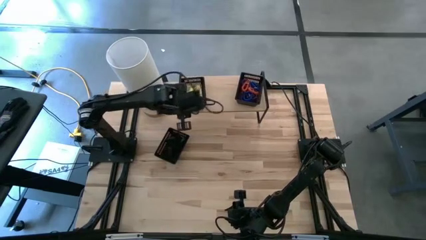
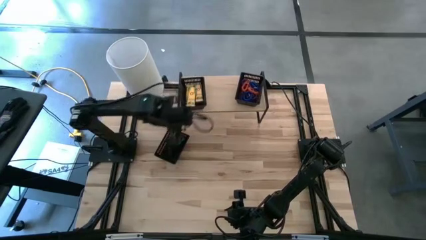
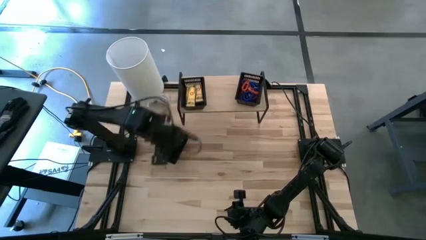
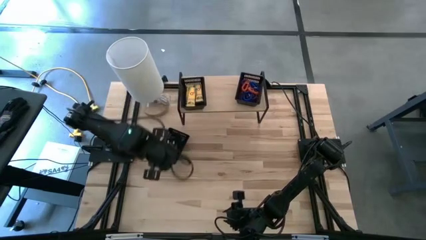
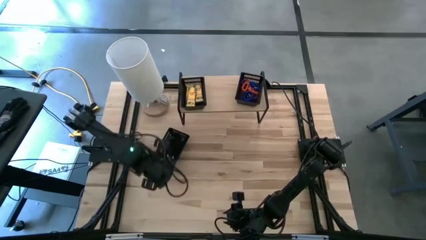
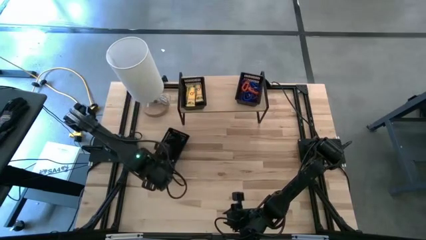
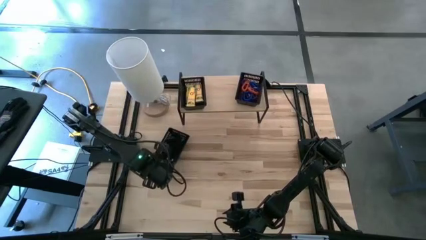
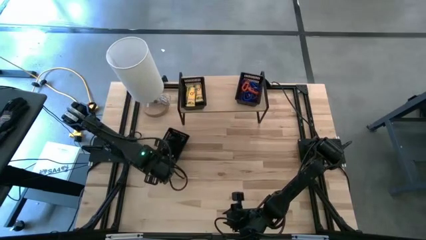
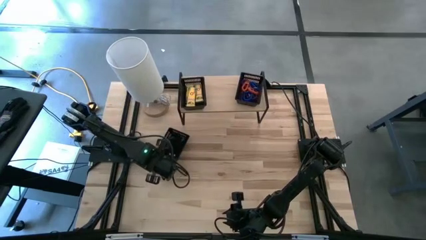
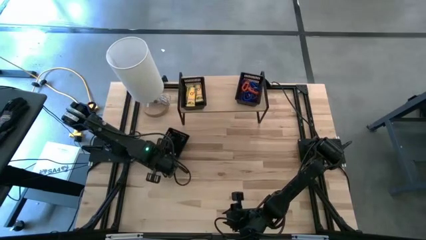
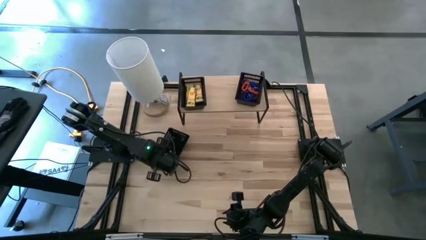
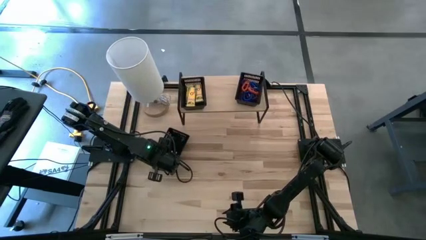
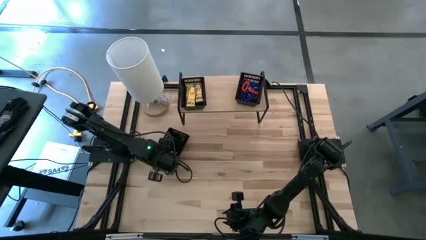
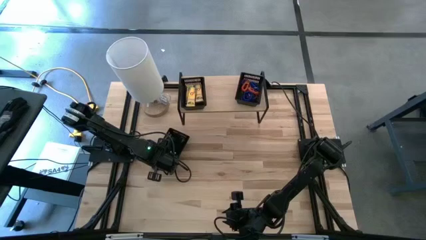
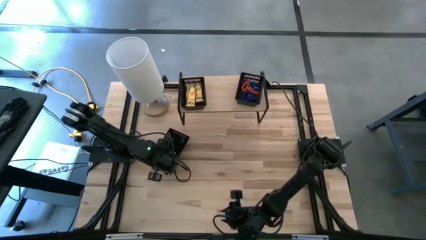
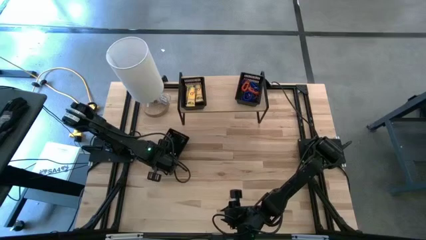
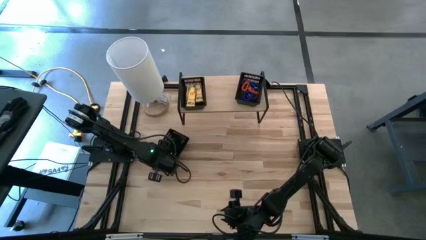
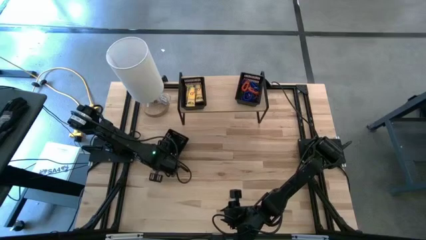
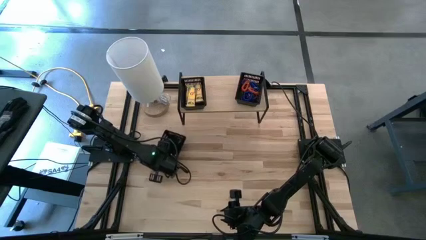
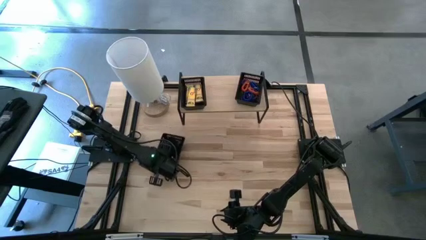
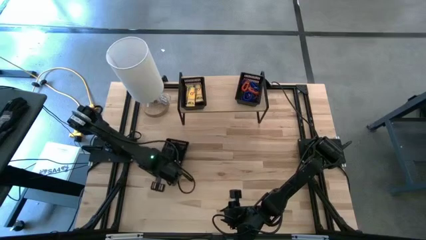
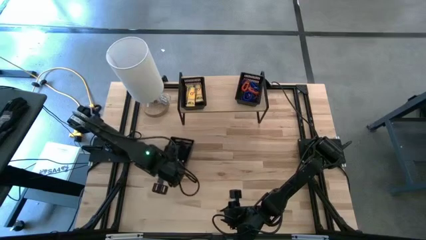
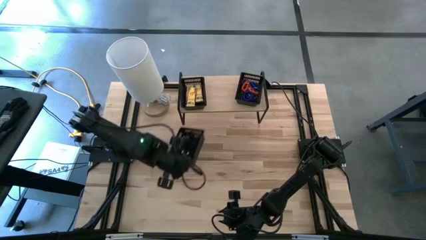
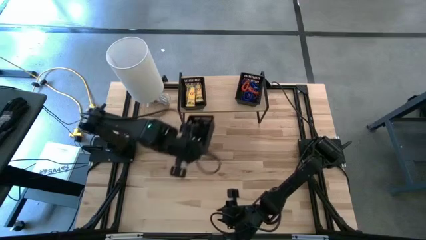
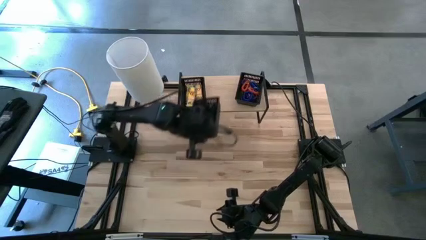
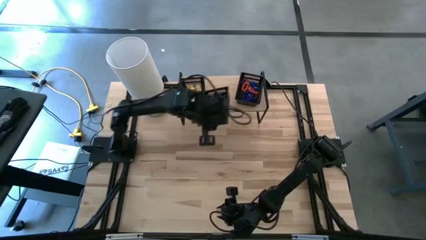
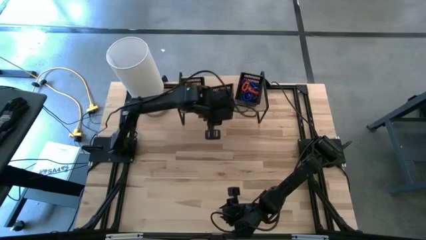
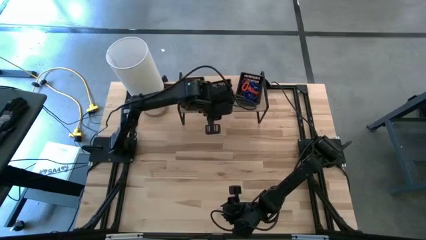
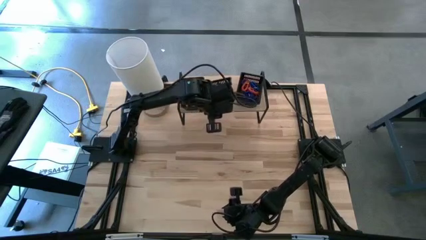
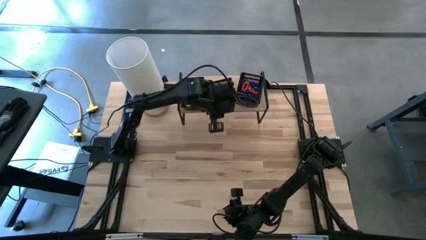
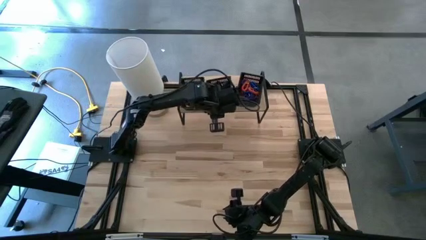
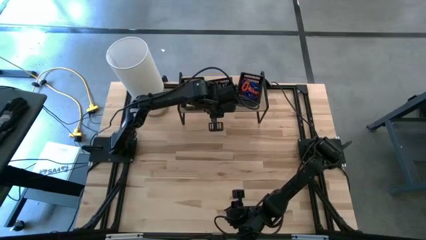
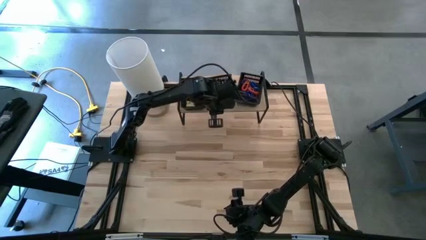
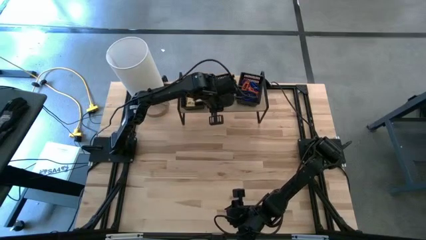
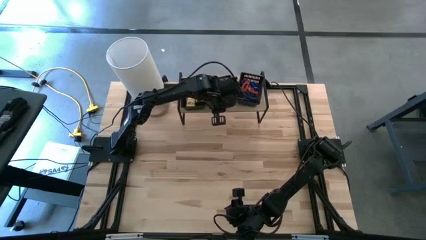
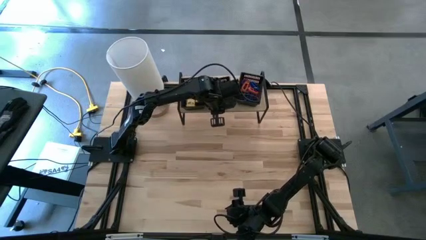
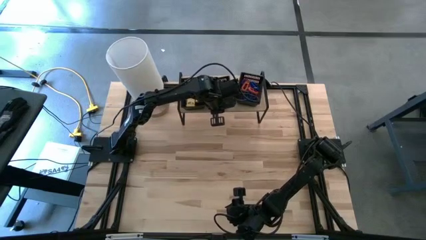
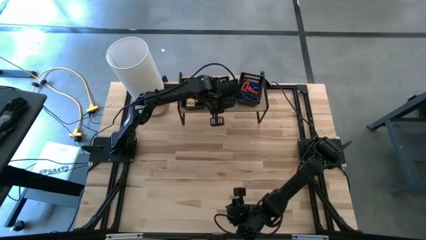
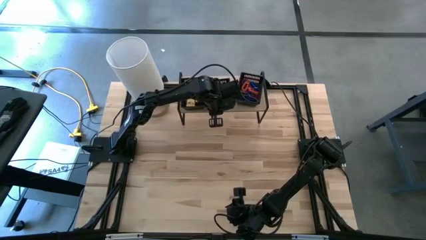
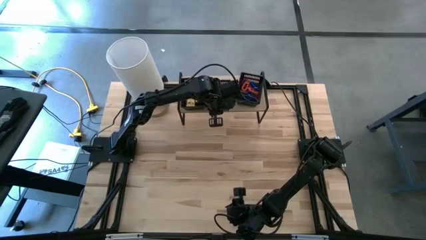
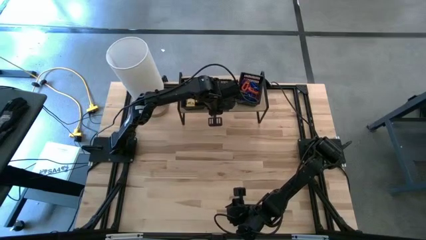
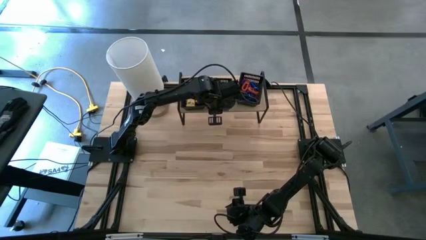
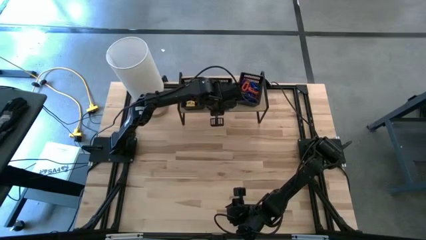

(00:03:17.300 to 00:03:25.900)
Task: Pick & Place Office Desk Supplies
Put the black bin with black rubber bands on the shelf

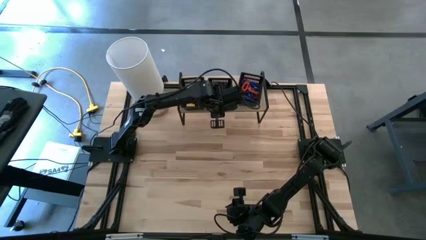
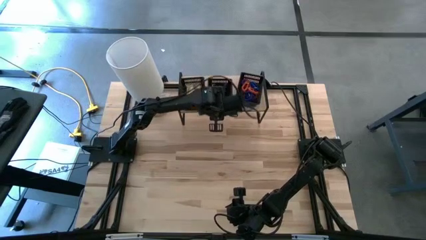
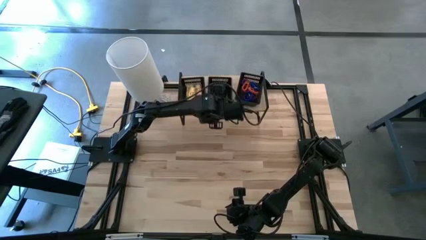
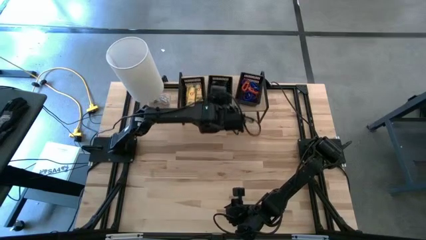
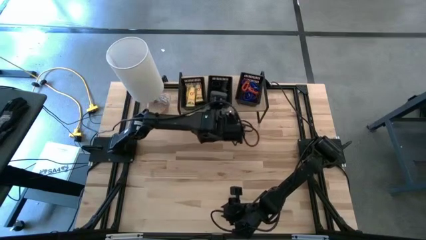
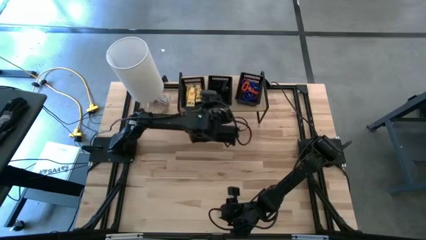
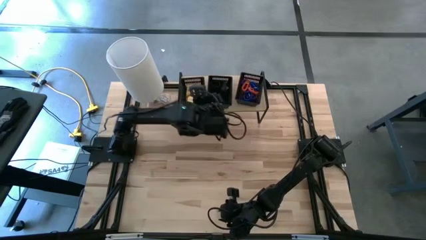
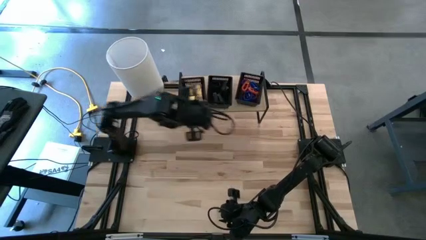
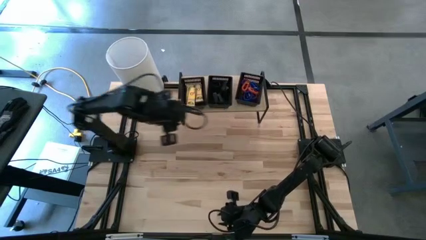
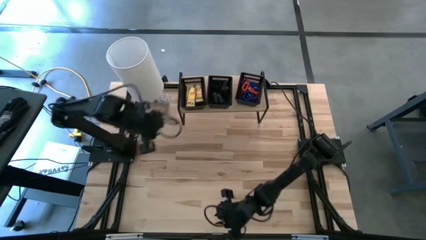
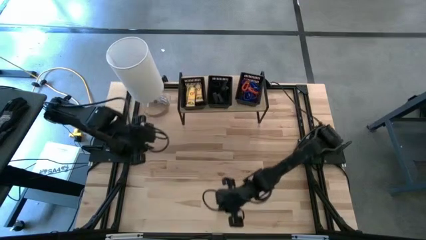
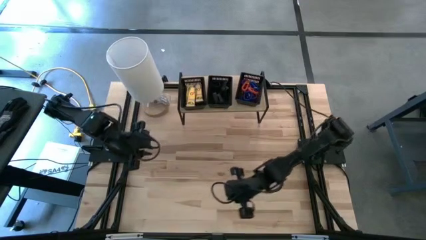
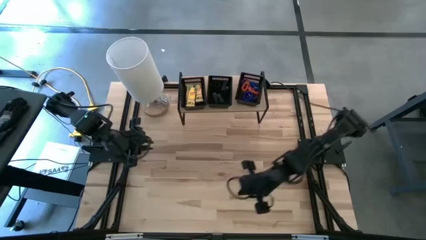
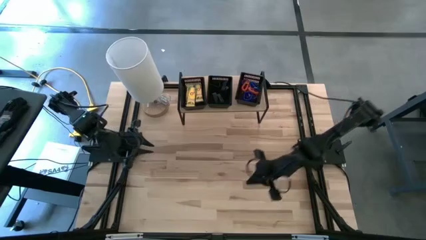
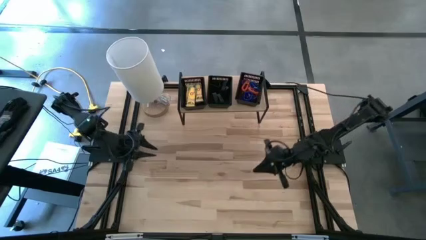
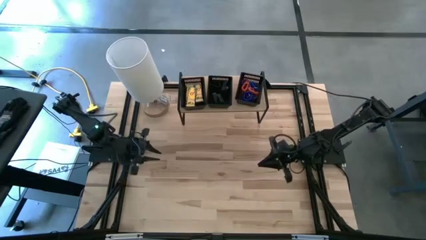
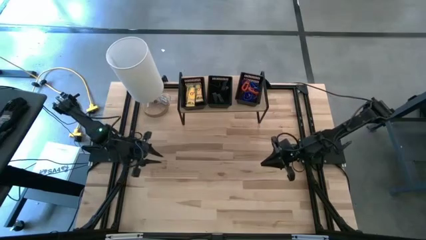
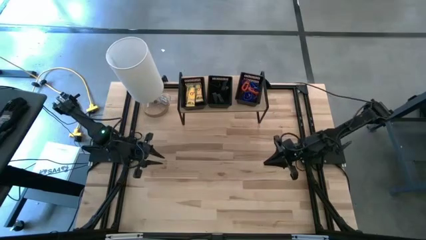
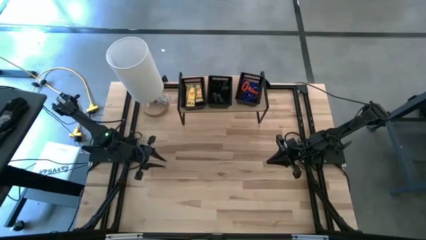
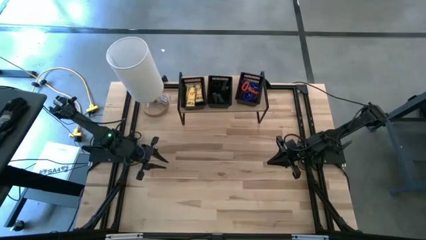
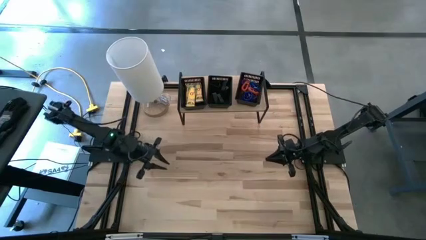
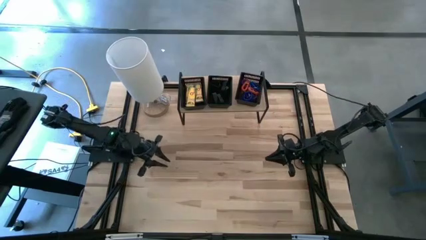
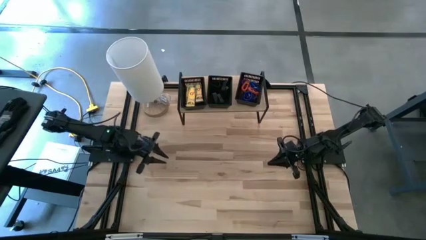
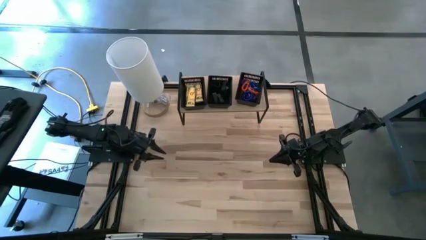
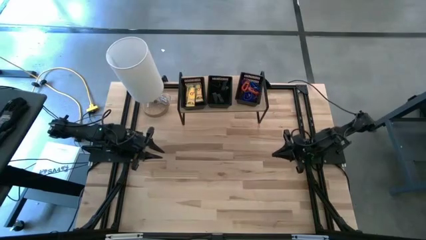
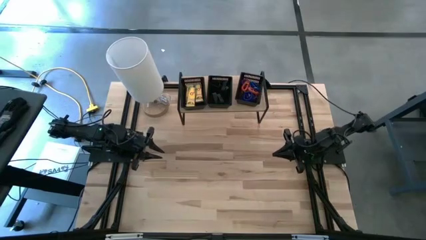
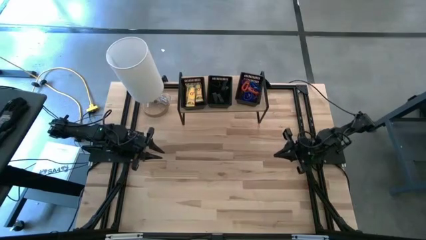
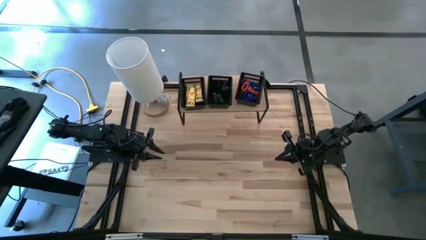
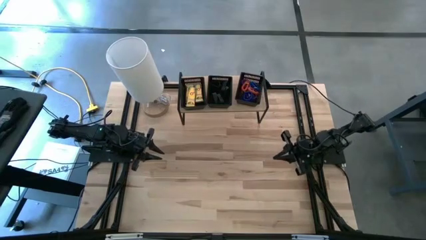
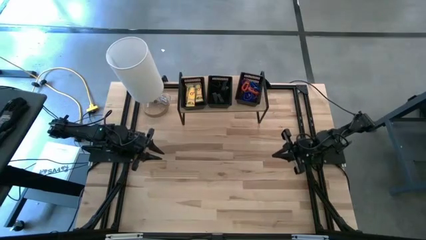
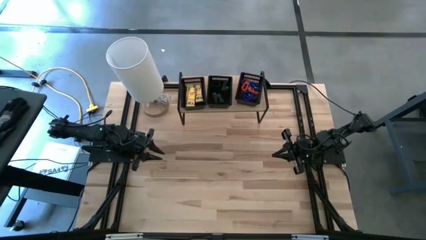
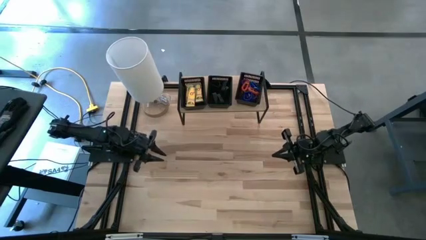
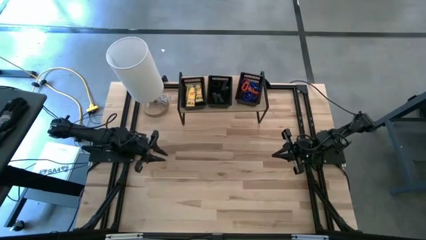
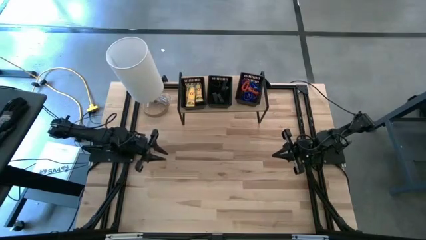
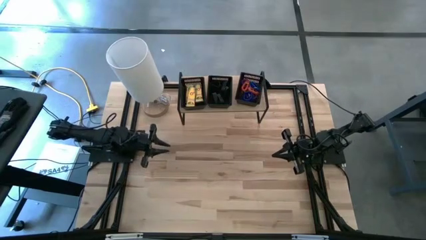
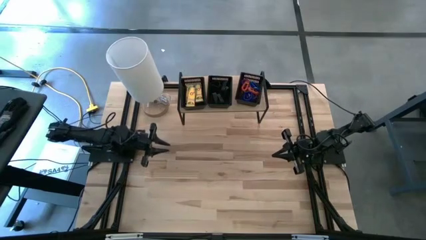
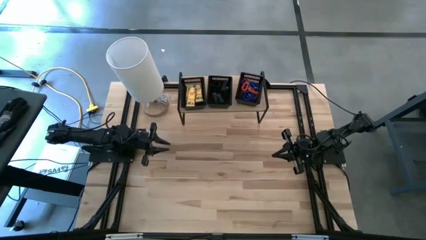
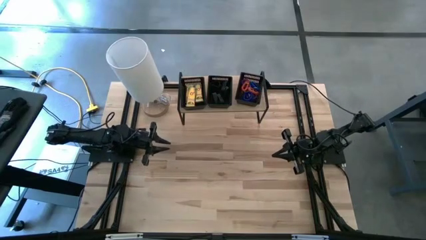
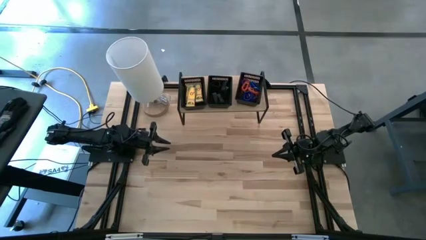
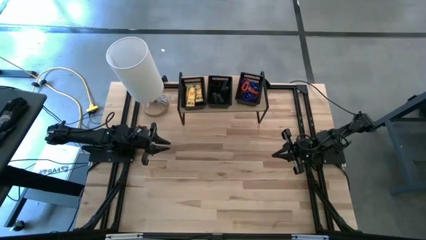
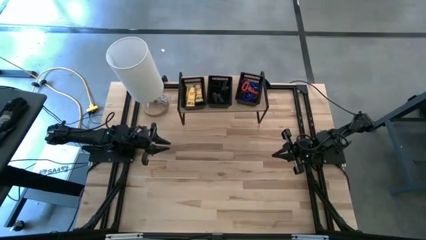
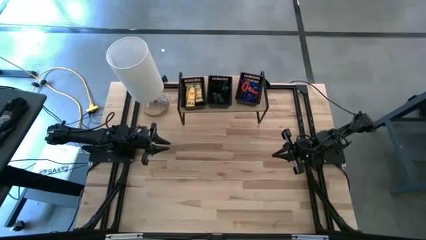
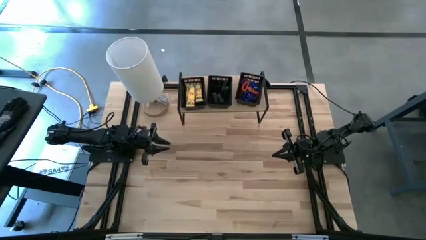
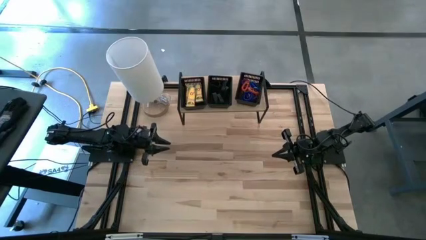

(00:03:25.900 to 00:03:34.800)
Return to Home Position
